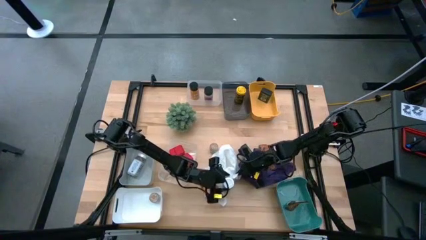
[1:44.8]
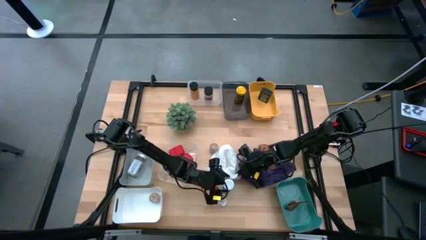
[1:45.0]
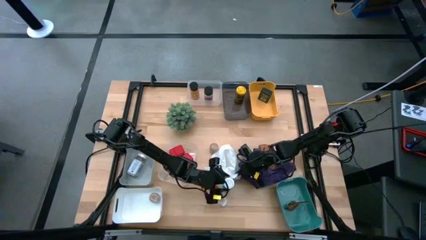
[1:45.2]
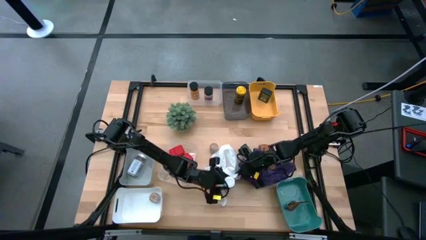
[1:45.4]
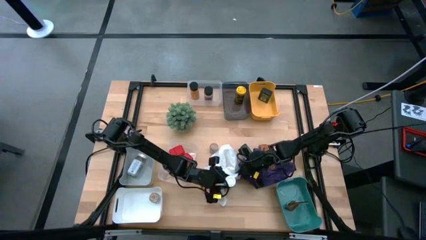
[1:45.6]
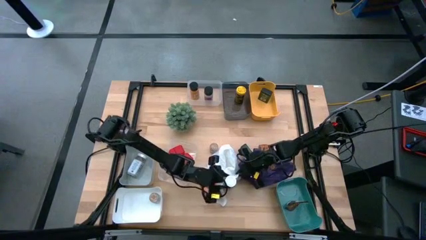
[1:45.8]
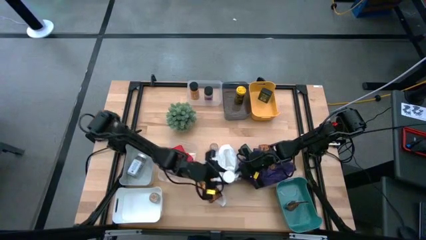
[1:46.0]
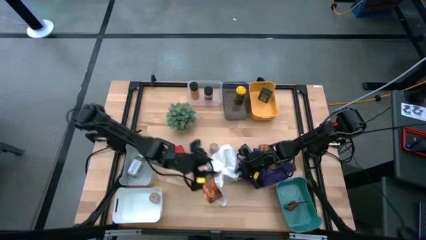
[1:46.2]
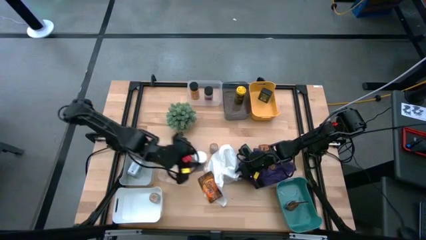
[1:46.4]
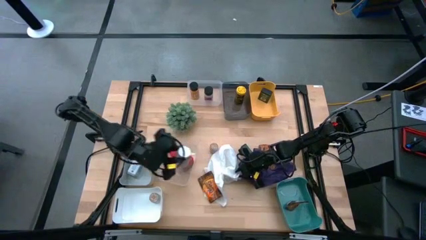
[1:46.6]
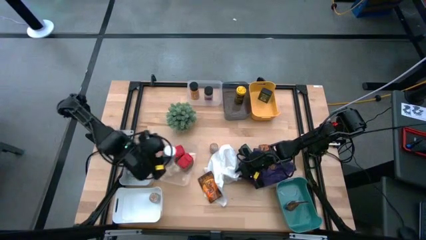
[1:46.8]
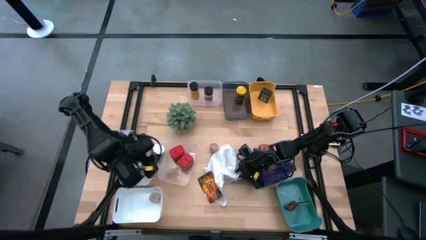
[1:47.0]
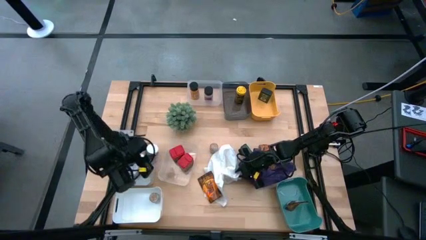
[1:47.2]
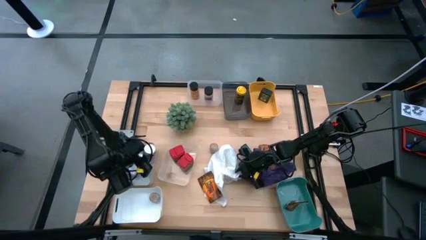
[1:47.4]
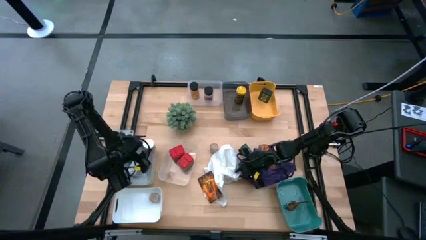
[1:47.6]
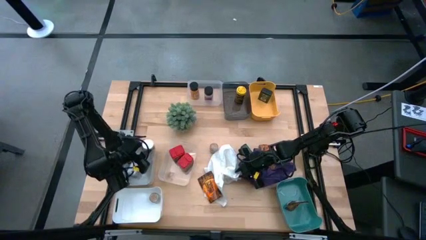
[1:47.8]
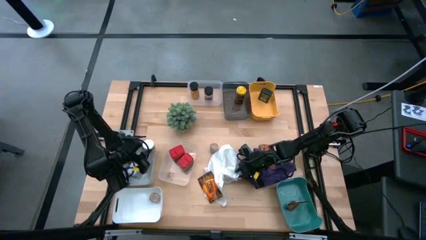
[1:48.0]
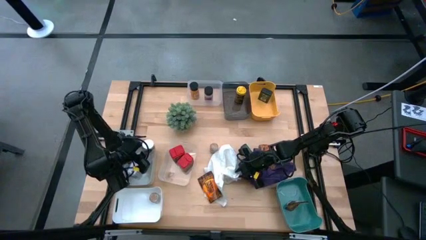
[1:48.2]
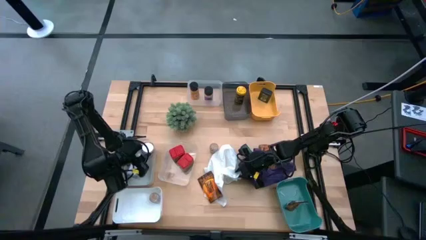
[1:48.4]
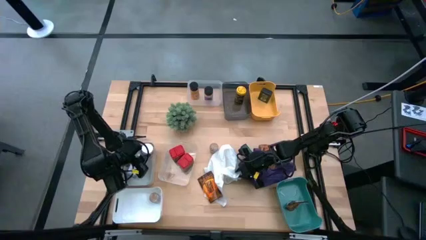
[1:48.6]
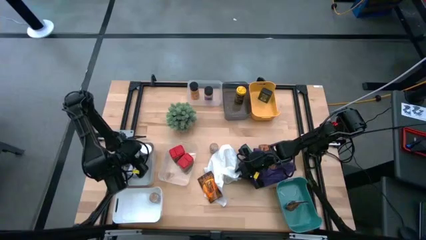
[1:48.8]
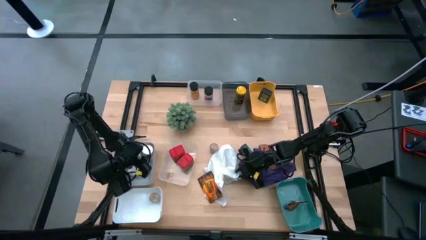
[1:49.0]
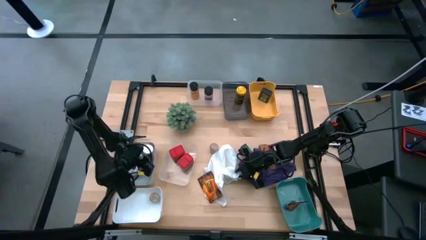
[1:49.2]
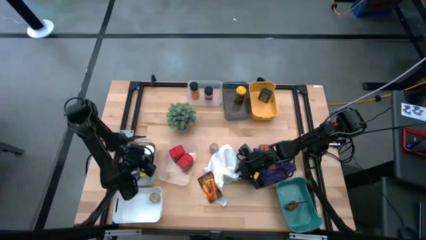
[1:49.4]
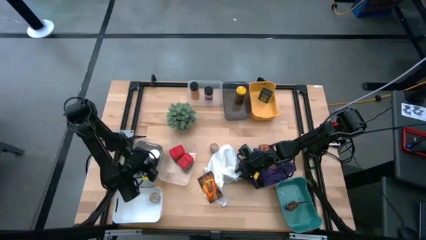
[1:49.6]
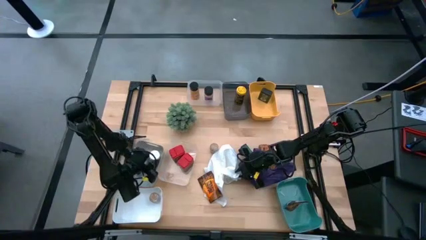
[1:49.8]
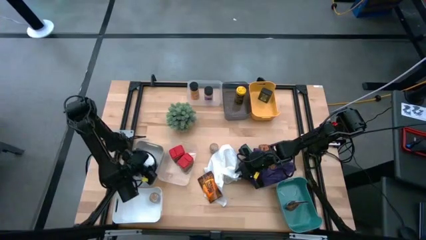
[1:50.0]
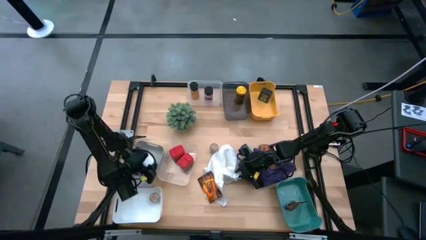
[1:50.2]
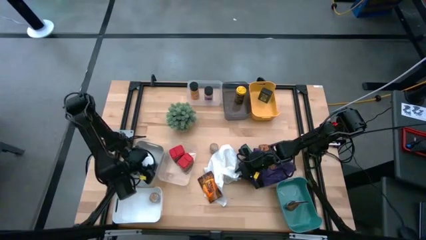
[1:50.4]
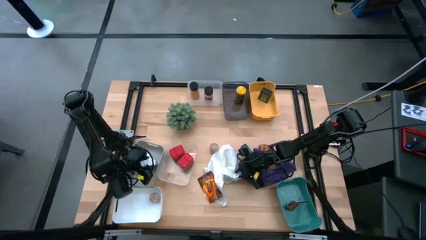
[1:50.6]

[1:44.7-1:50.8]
Task: Sort spices by type
Put the white seasoning bottle into the gray bin

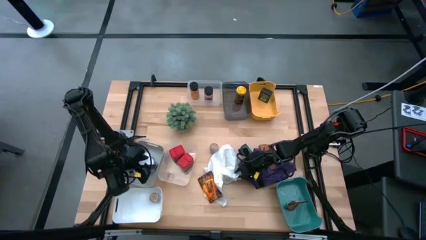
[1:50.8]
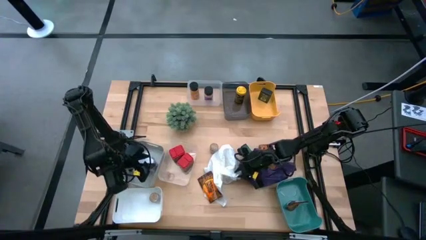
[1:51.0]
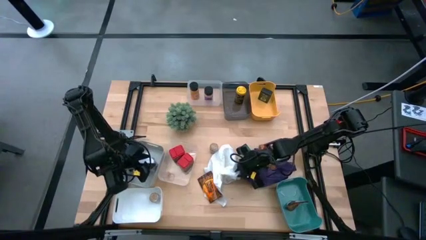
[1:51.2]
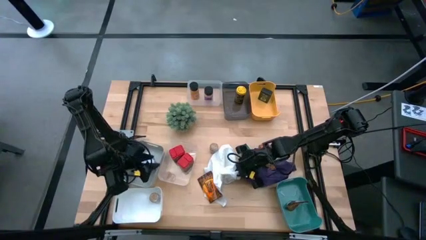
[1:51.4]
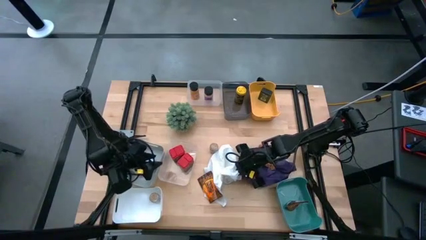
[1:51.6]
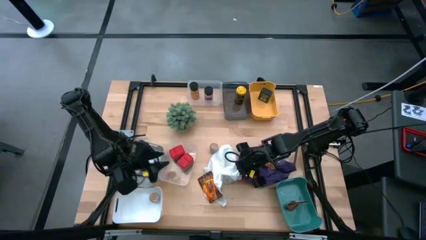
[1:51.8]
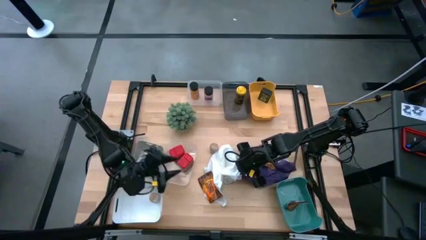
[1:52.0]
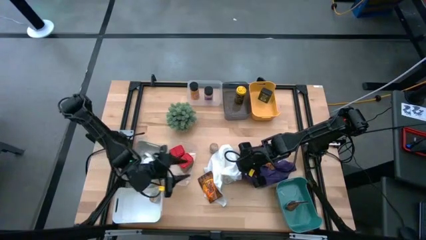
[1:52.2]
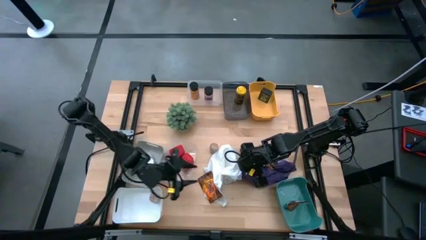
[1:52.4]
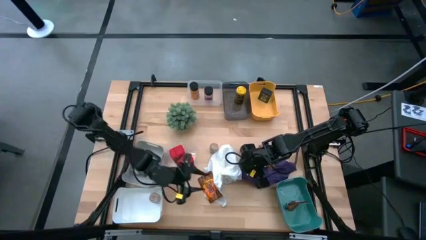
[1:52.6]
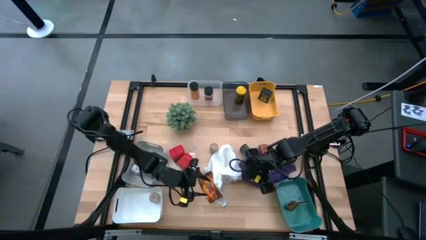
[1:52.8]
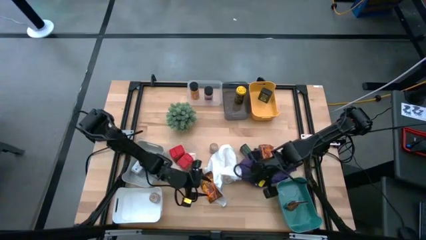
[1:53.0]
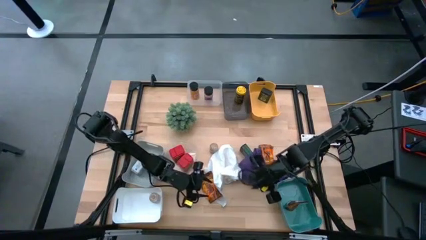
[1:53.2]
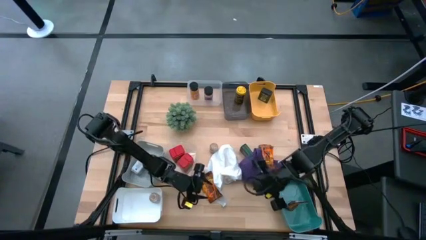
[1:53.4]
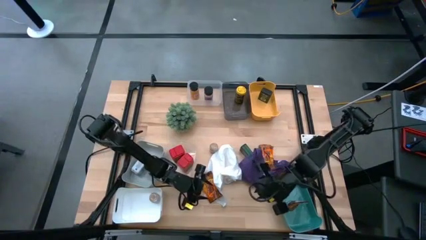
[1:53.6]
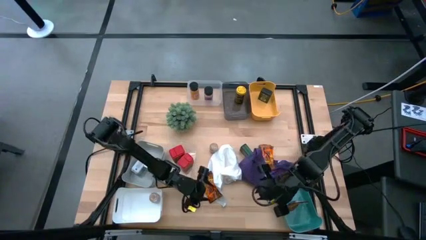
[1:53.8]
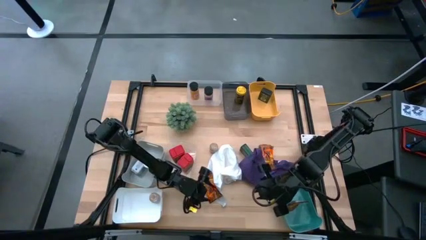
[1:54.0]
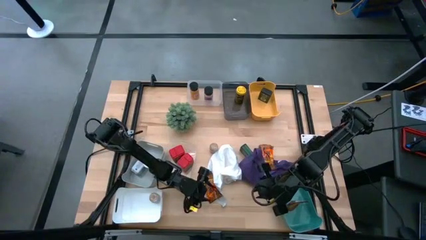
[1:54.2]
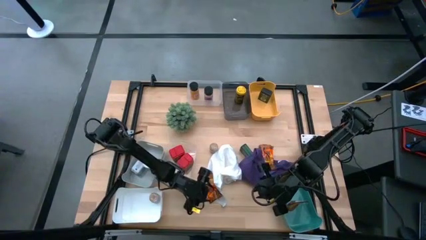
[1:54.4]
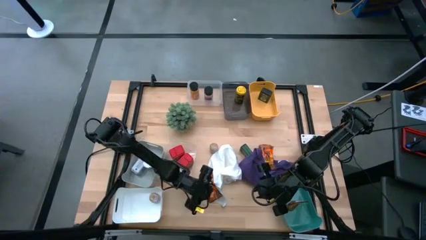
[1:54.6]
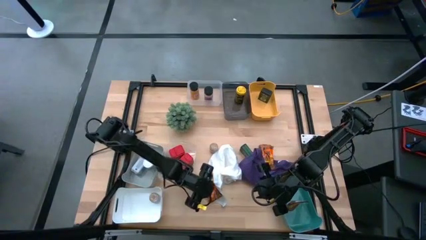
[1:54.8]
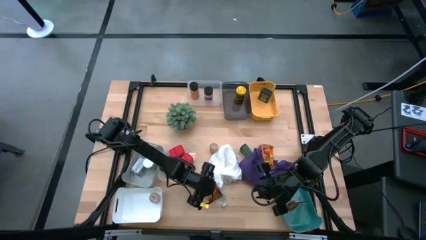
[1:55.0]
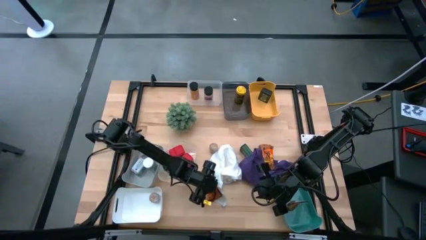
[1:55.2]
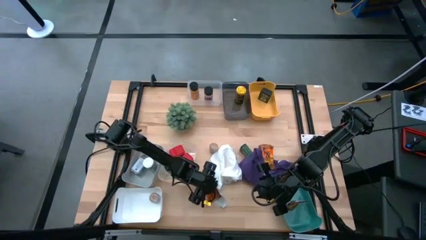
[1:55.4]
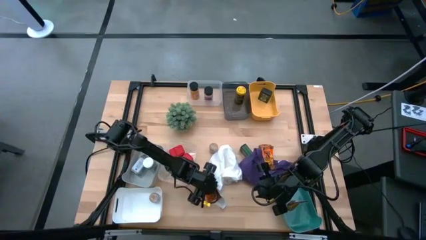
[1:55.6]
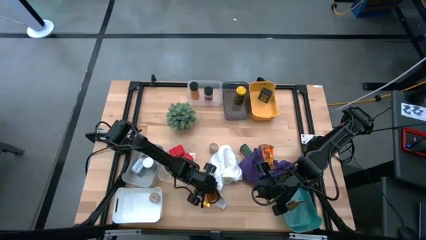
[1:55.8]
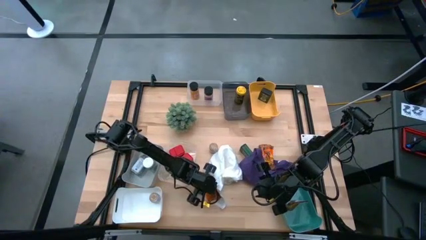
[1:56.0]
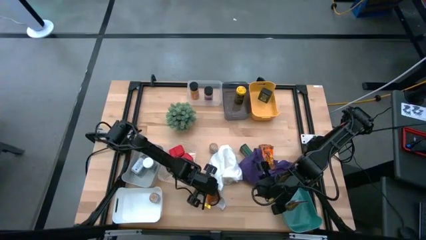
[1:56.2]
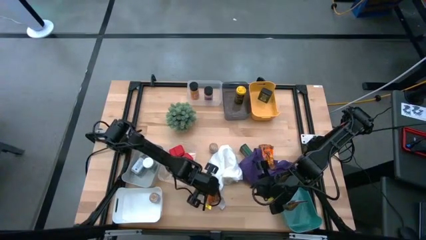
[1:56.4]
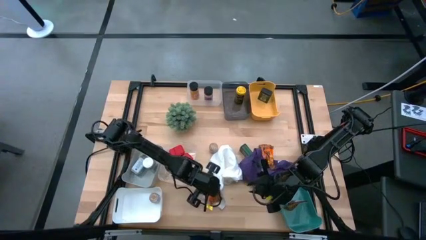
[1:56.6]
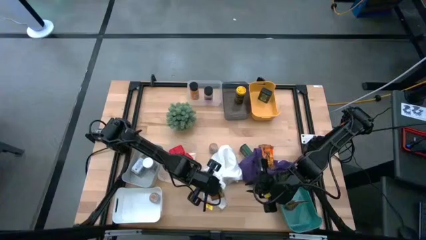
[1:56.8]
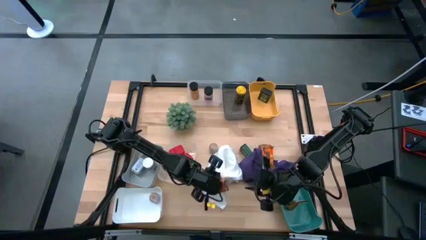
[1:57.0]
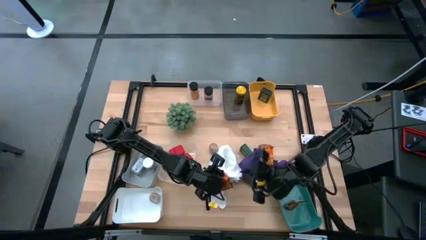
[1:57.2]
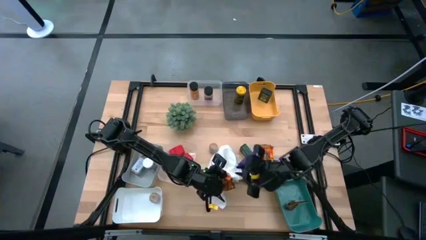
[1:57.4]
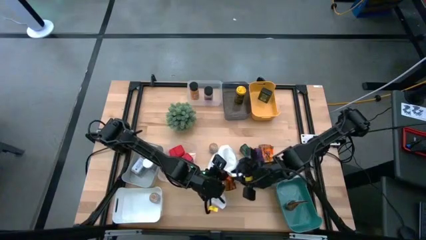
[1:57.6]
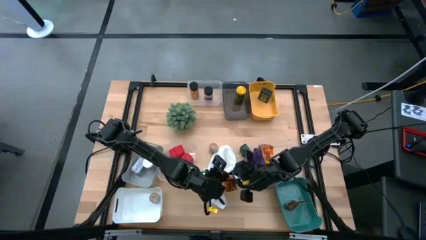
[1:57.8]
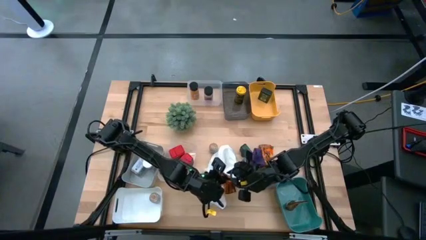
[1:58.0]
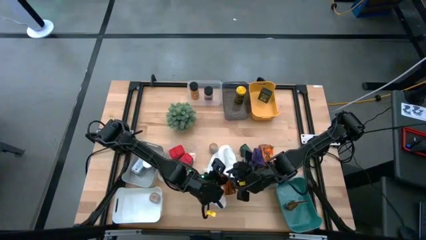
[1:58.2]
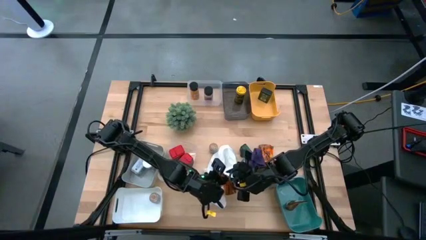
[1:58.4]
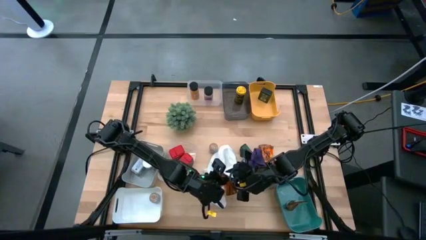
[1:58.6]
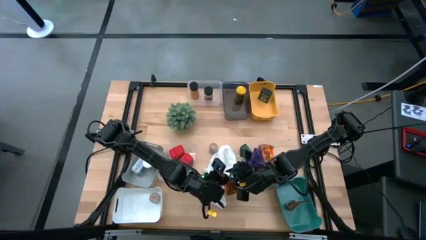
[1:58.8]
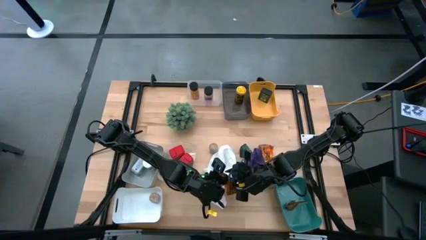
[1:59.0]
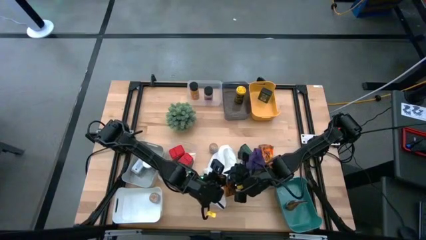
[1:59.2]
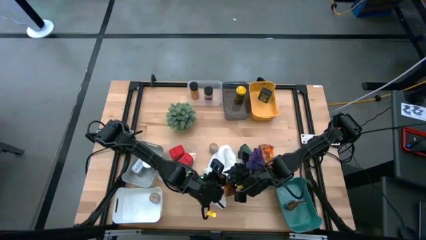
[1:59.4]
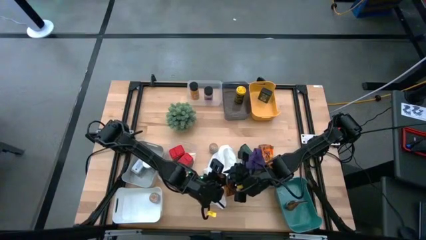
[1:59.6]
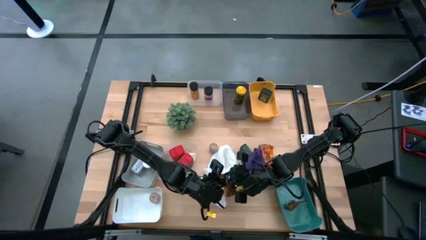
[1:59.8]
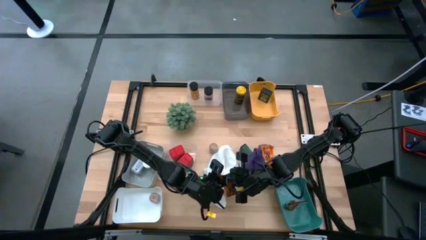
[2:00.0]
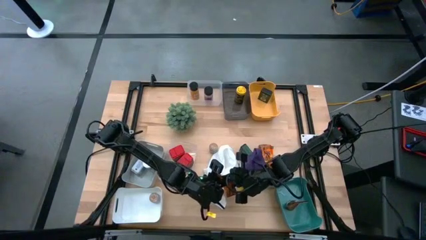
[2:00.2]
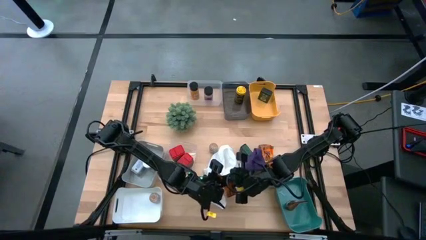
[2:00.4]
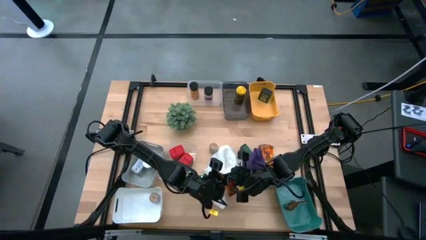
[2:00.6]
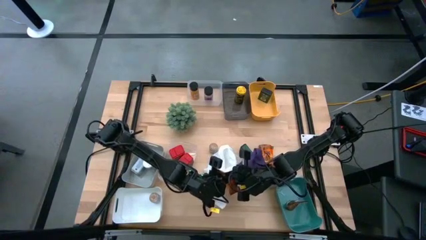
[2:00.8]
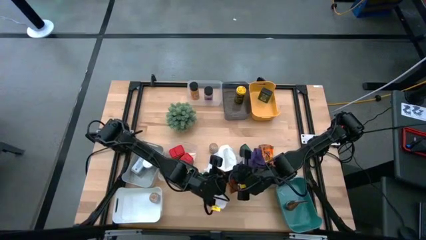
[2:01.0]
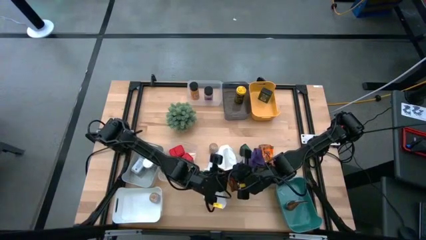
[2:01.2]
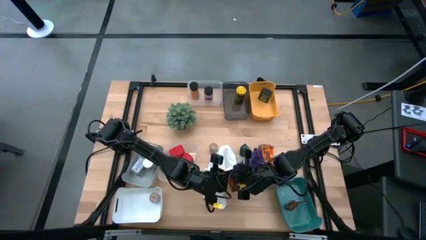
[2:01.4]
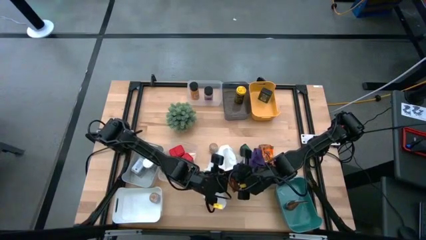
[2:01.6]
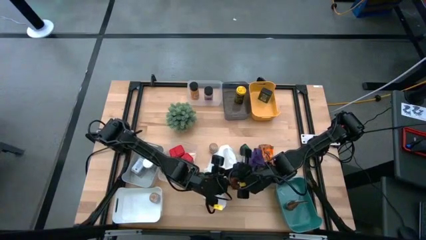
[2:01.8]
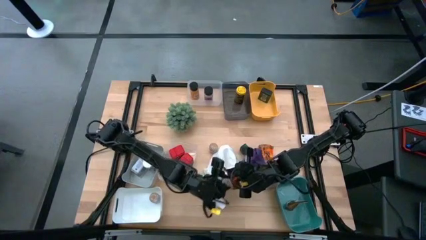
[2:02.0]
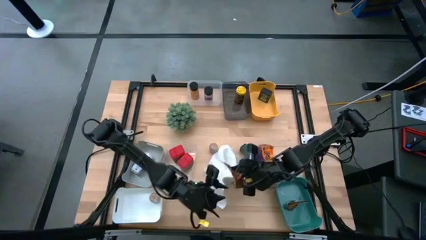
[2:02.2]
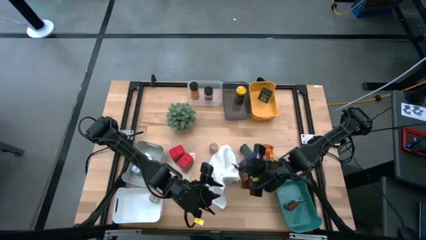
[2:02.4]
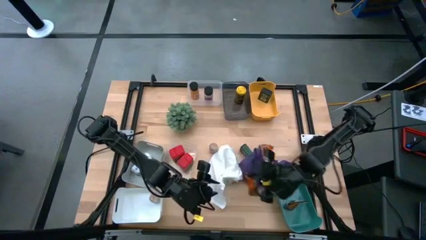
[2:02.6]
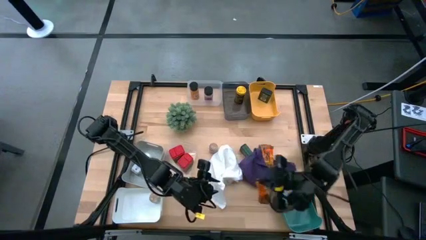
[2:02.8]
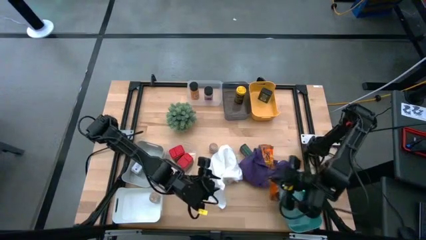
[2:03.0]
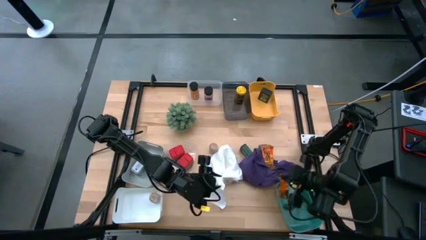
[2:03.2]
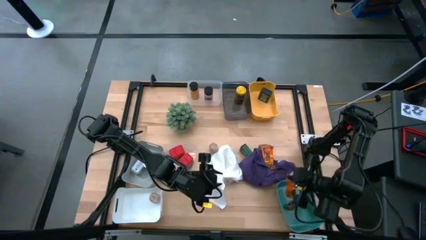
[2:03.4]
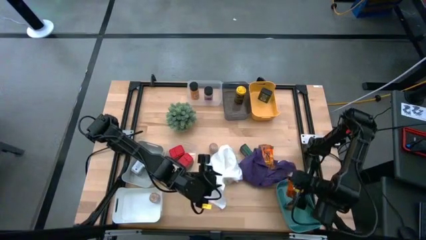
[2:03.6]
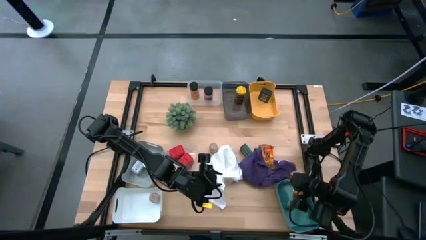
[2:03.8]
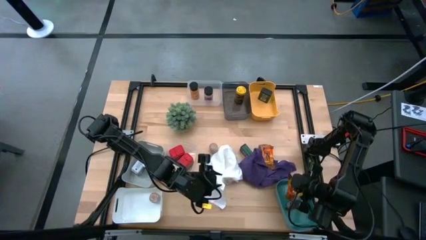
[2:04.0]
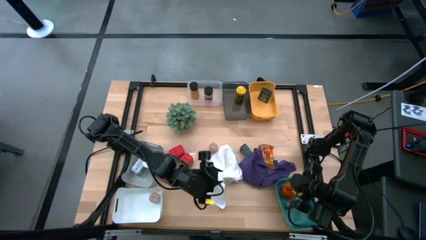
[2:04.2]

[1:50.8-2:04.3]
Put the bottom orange seasoning bag into the green bin
